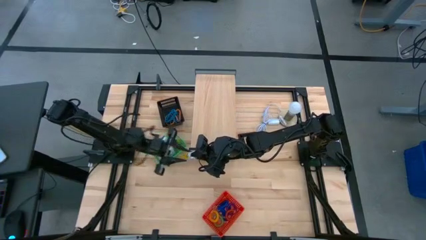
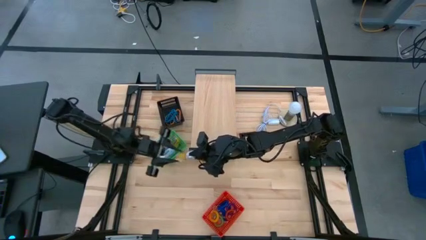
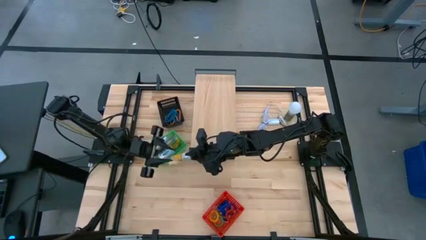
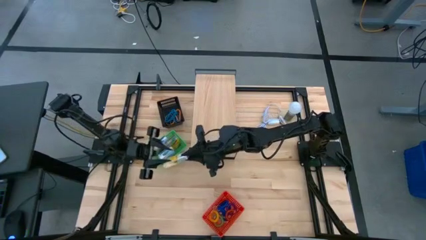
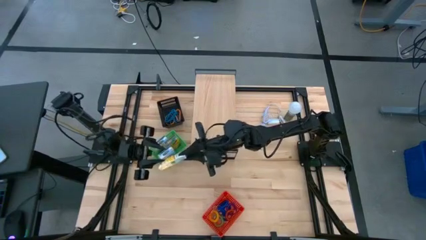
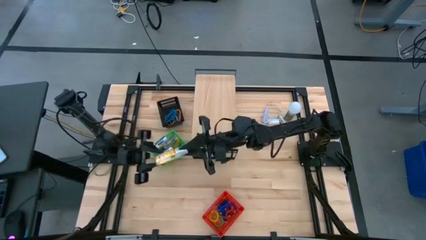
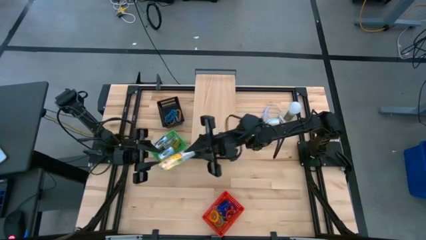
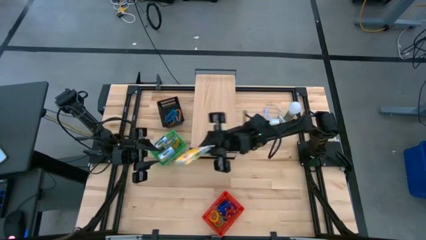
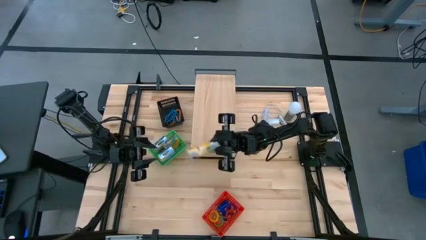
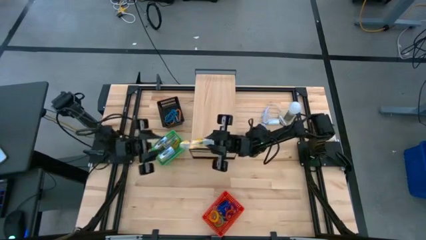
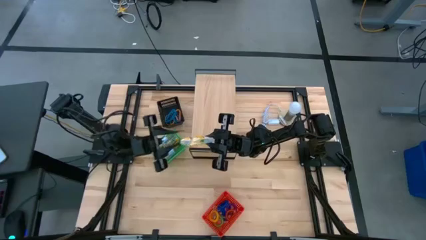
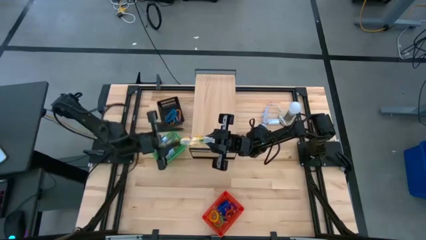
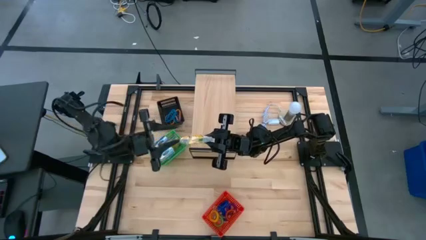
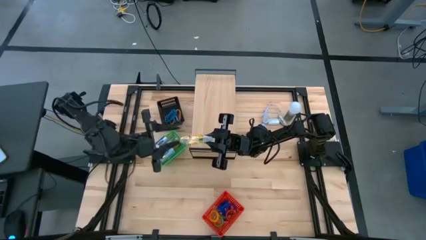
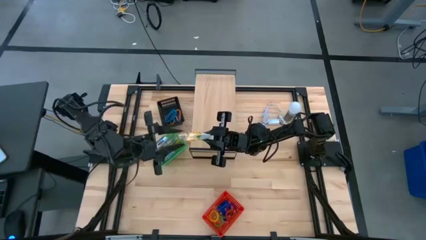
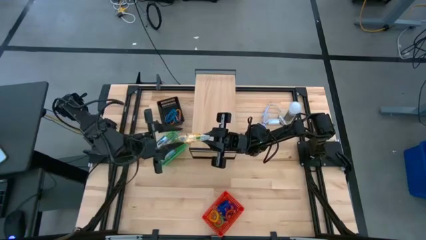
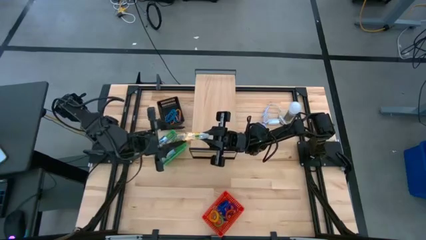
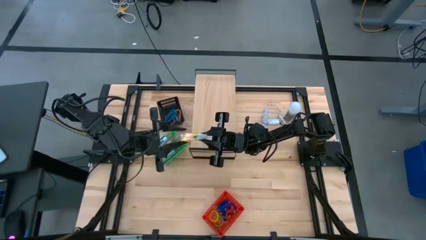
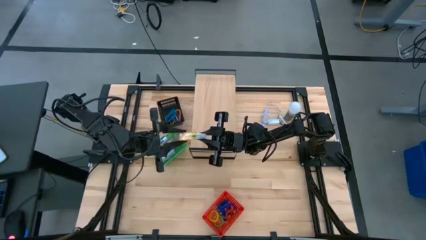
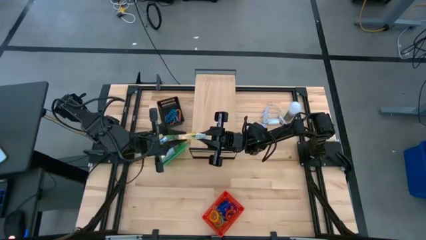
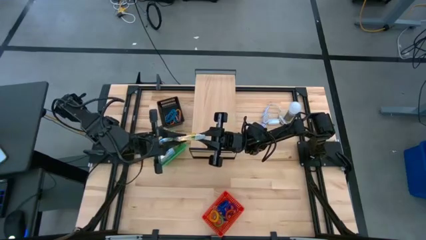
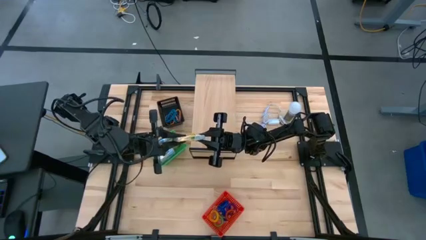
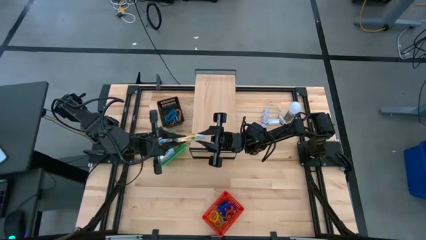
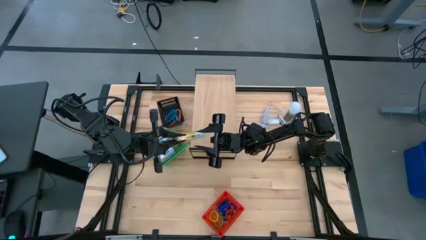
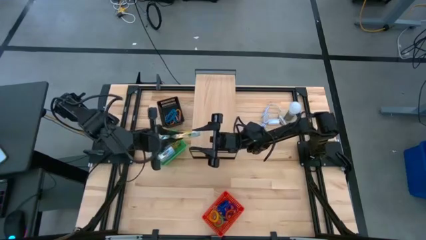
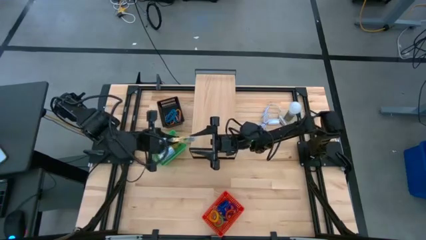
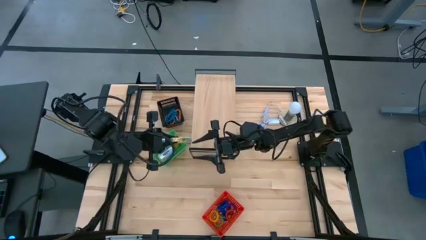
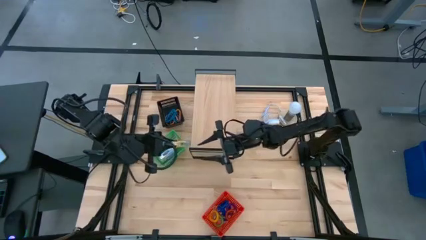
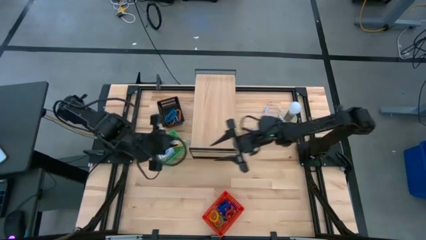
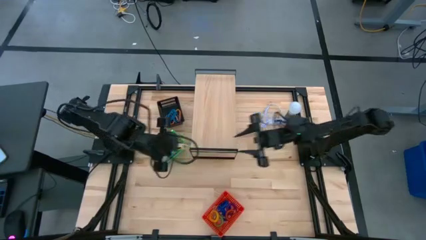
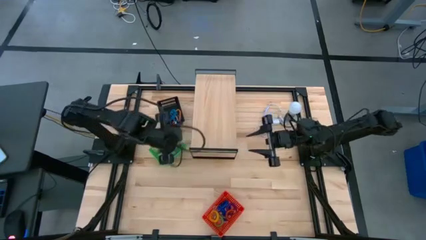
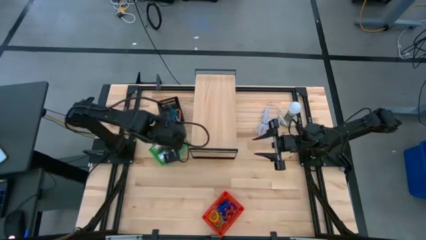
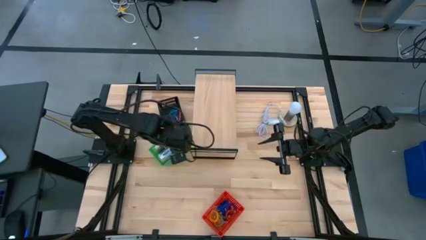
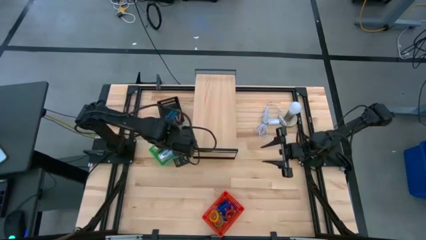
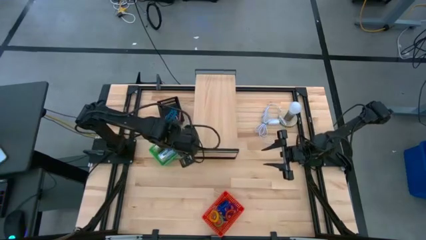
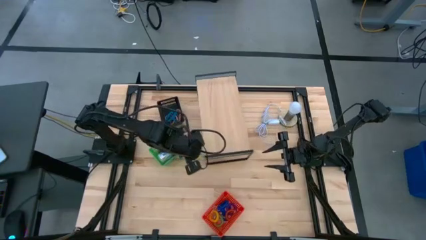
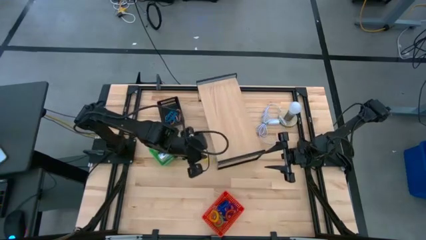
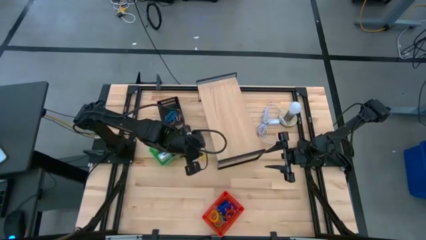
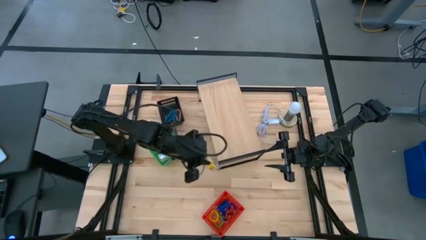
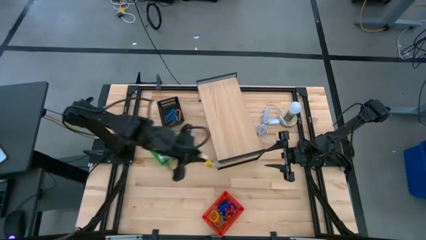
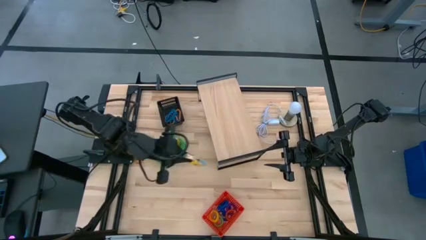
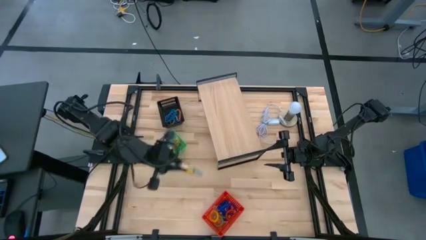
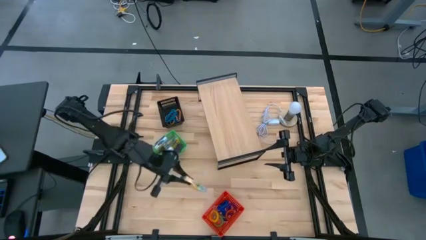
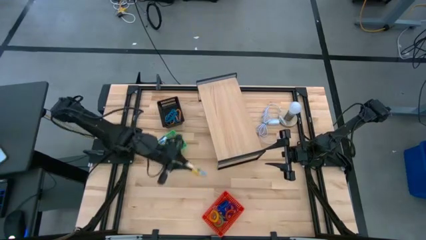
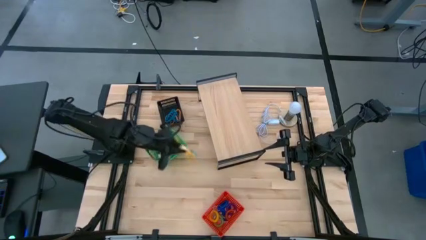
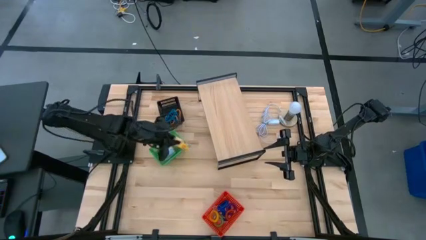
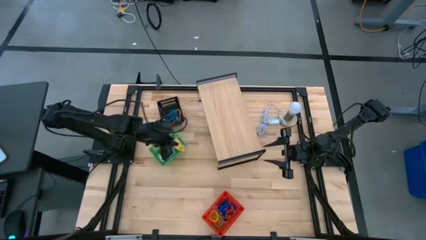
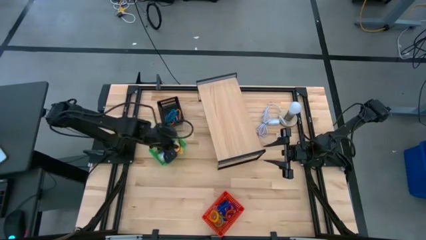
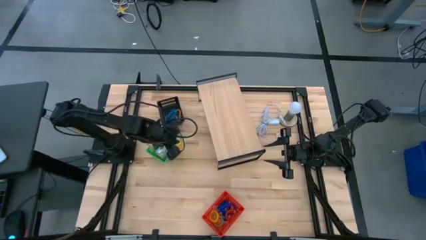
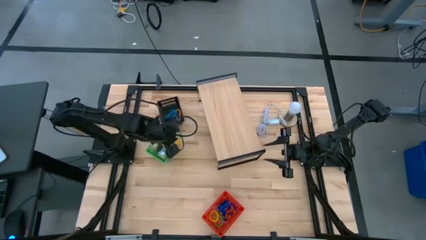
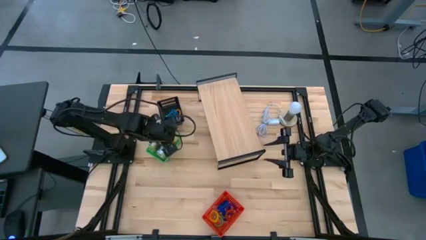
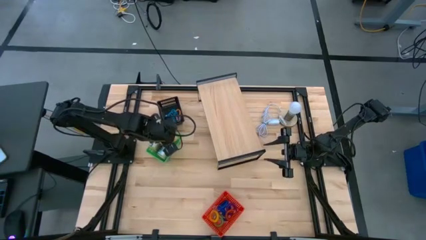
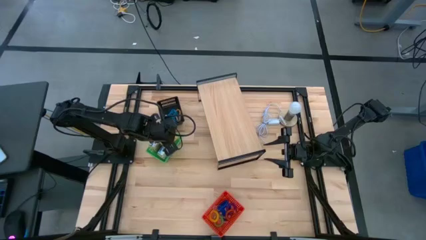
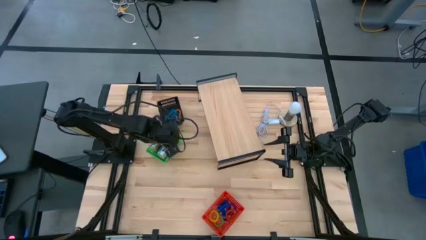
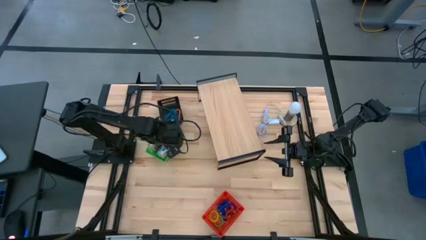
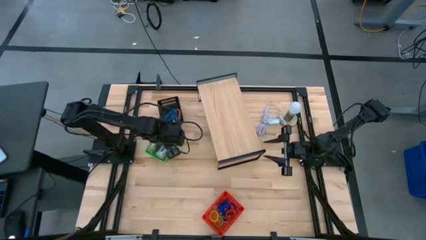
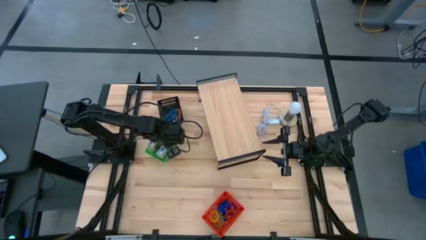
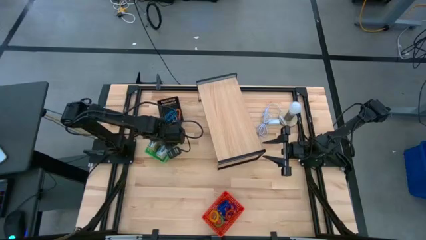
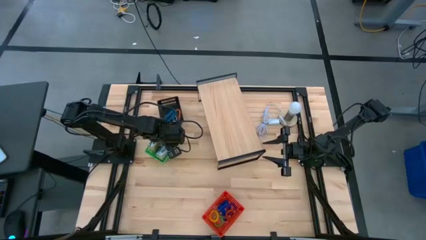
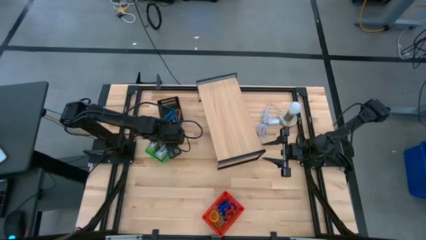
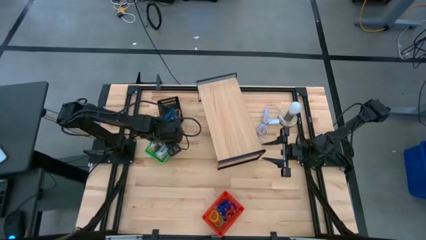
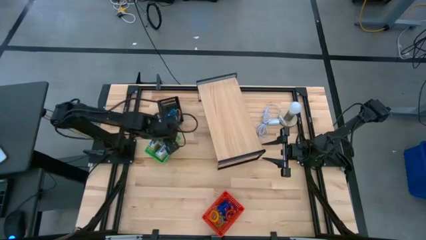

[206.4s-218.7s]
Task: Pick & Place Office Desk Supplies
Put the small yellow crayon box into the green basket

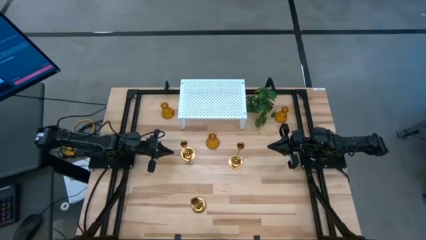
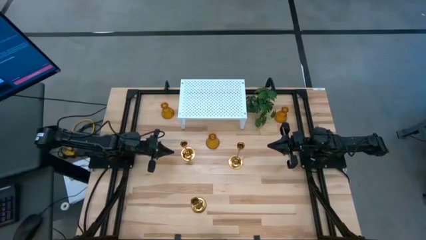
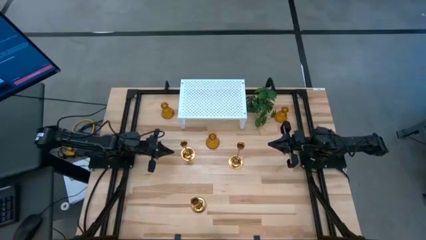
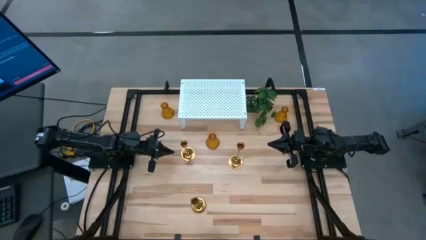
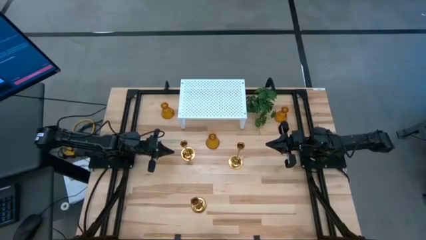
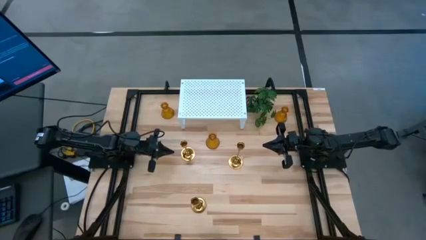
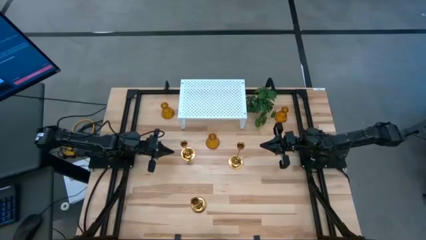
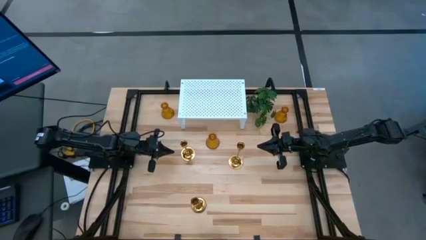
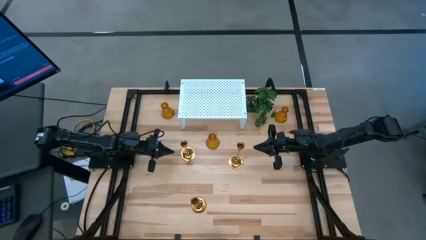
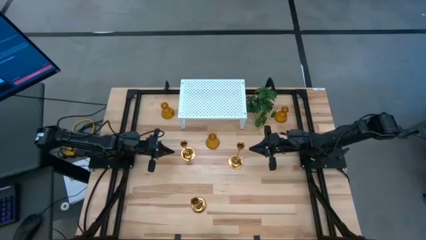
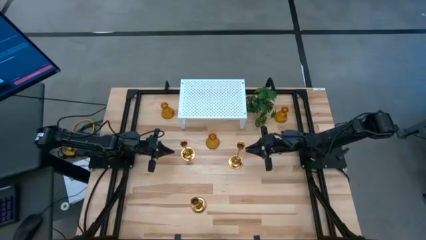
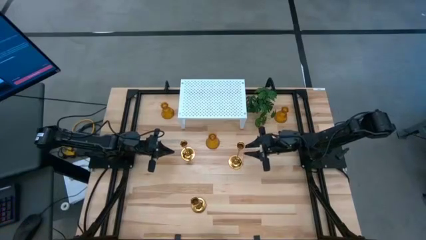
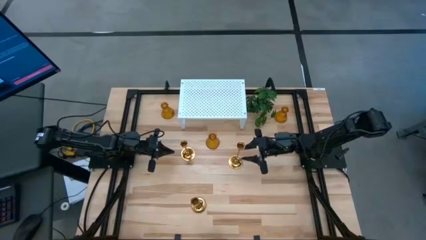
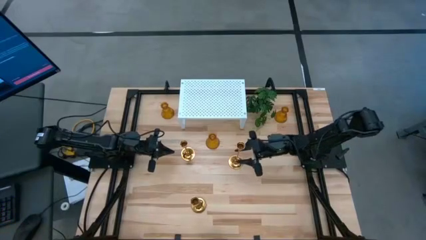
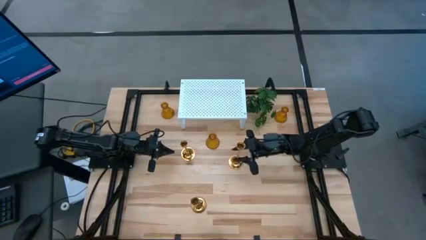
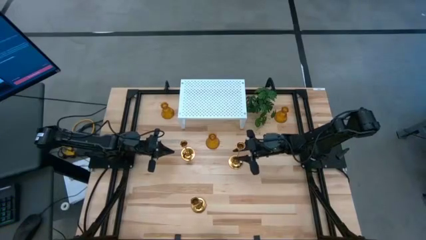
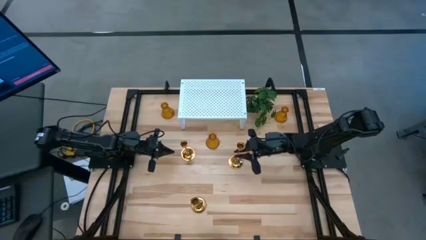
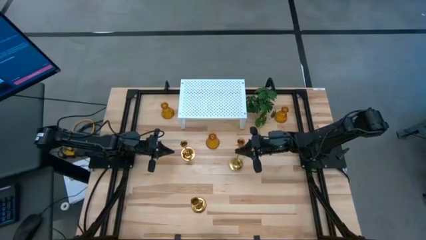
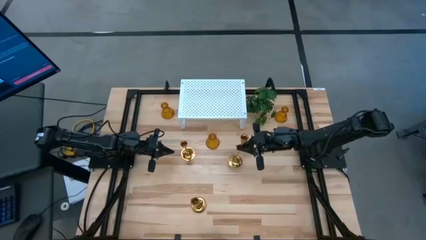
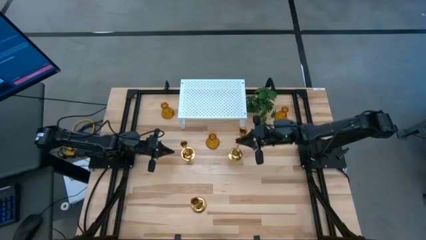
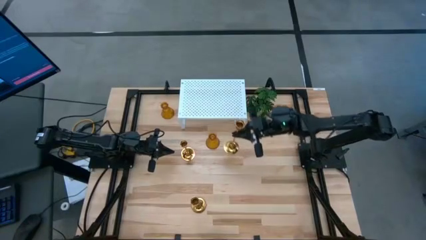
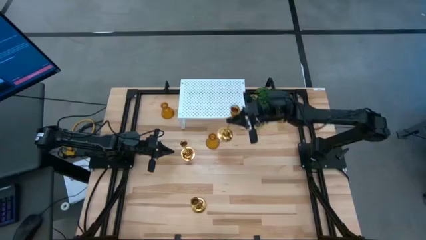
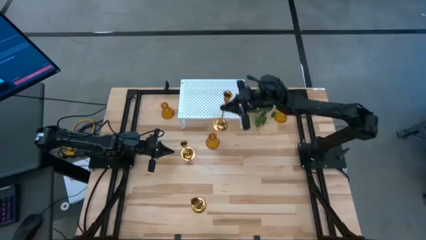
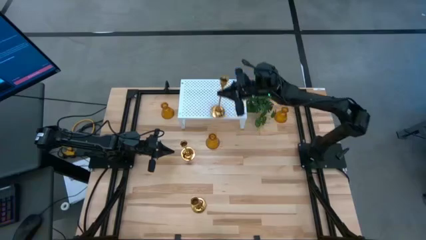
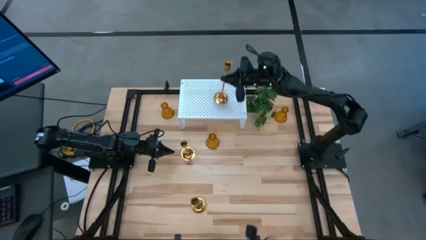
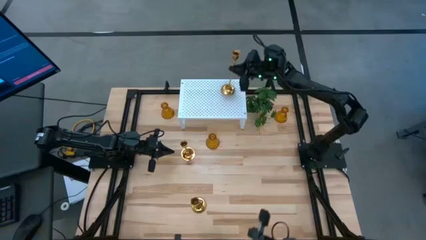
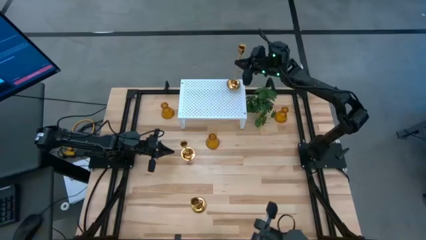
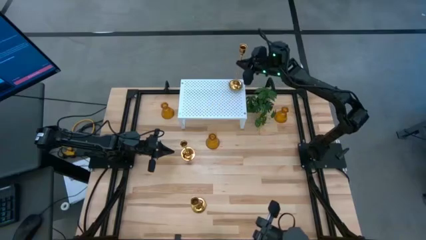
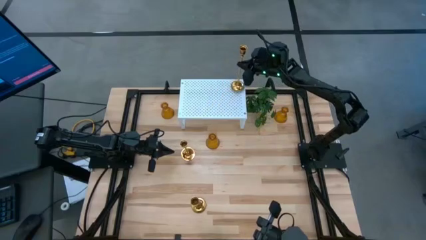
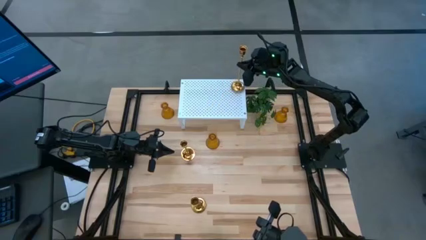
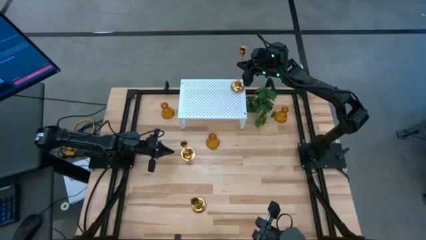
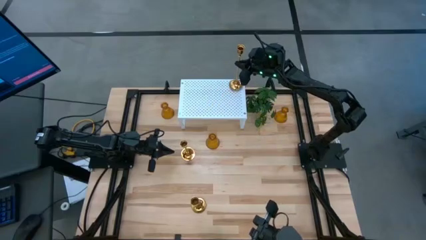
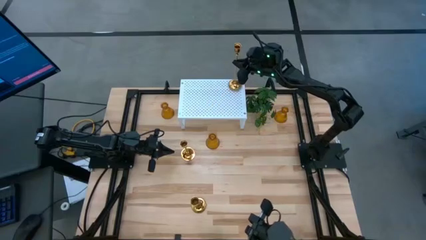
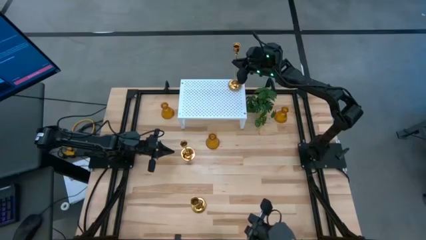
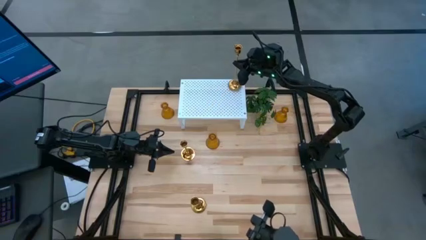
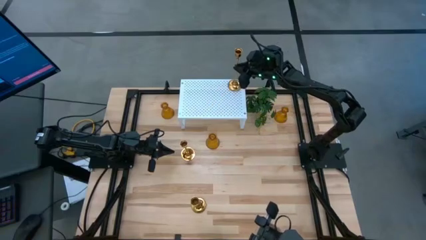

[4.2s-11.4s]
Task: Pick & Place candle stick holders
Put the top right gold candle holder on the shelf
